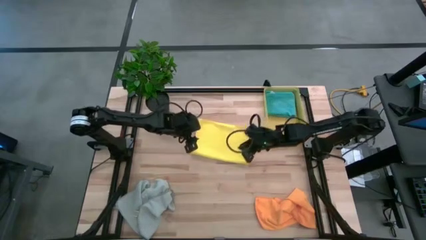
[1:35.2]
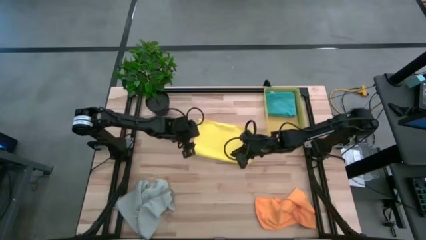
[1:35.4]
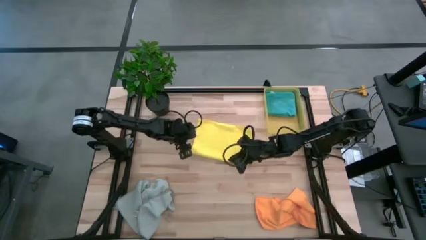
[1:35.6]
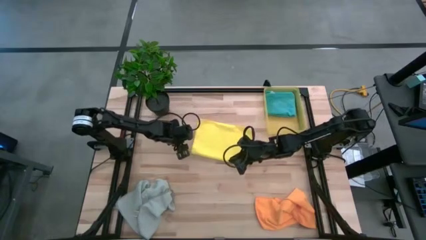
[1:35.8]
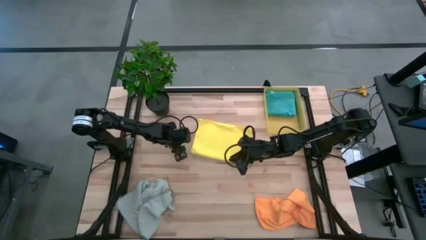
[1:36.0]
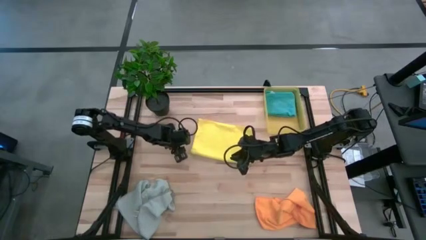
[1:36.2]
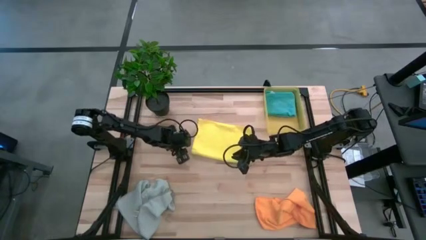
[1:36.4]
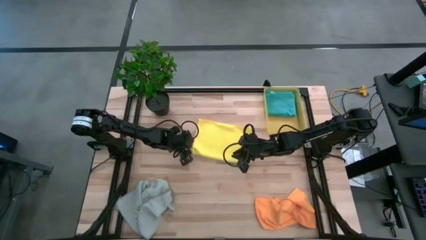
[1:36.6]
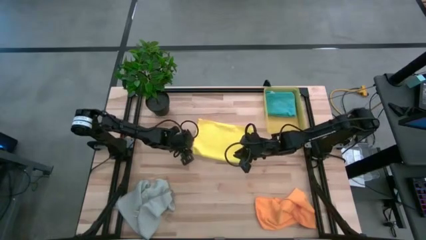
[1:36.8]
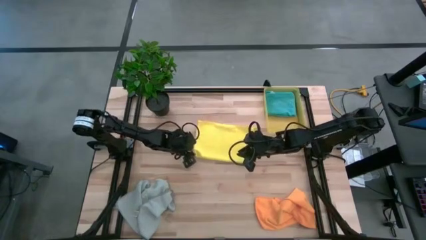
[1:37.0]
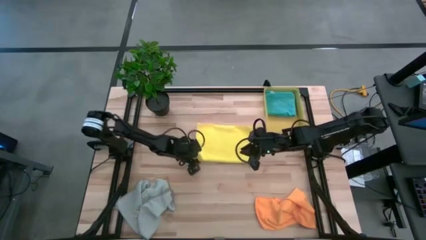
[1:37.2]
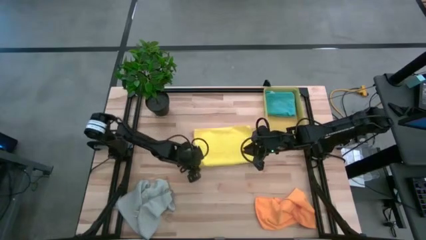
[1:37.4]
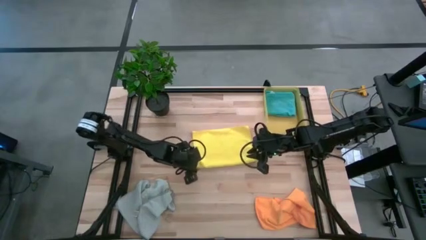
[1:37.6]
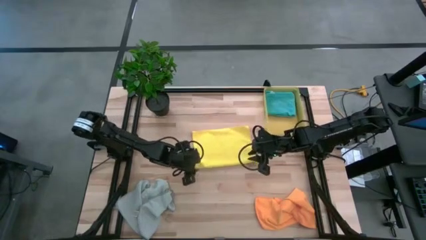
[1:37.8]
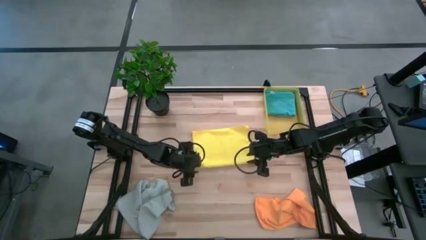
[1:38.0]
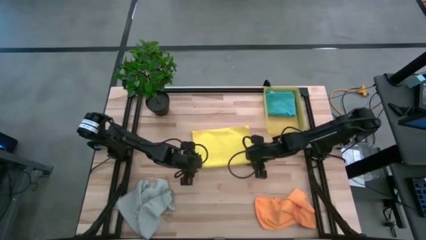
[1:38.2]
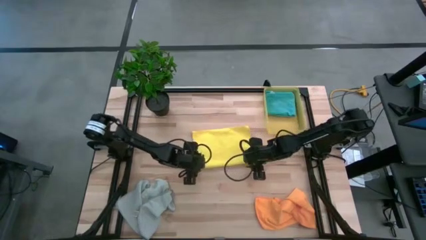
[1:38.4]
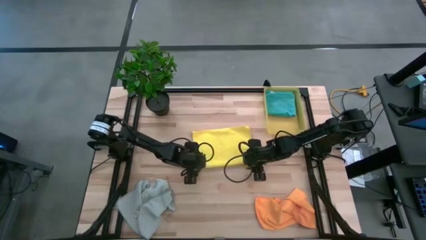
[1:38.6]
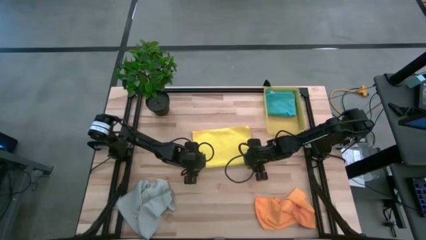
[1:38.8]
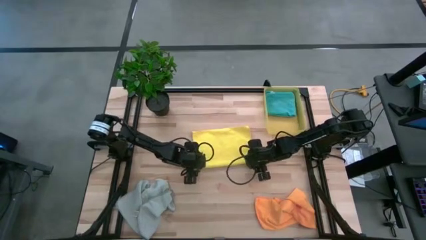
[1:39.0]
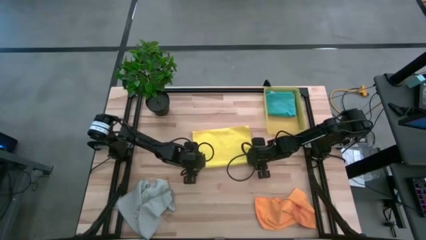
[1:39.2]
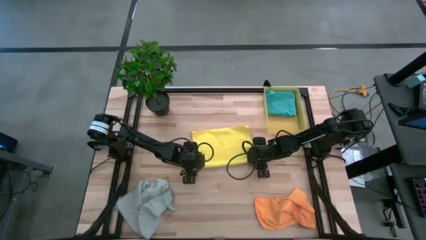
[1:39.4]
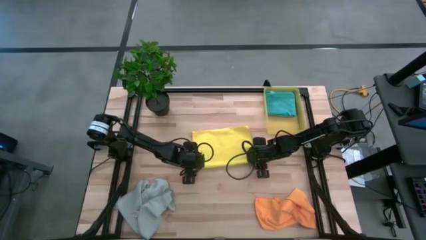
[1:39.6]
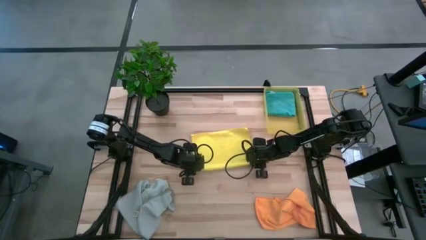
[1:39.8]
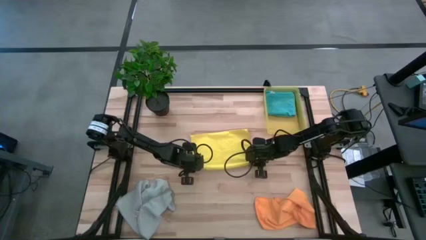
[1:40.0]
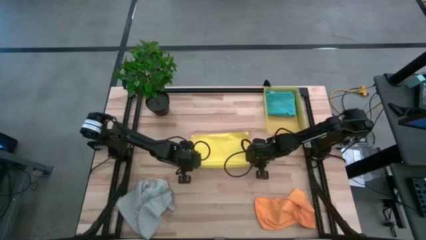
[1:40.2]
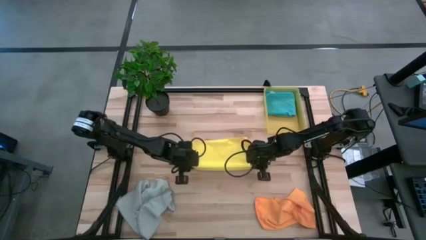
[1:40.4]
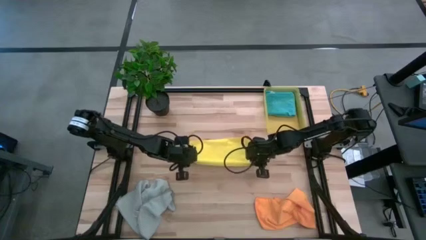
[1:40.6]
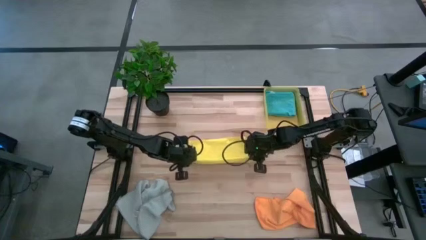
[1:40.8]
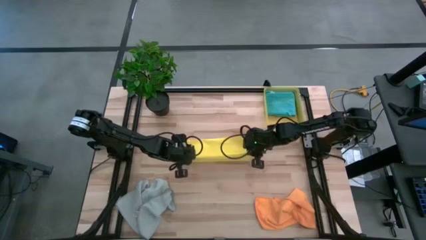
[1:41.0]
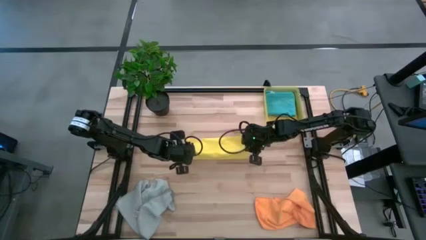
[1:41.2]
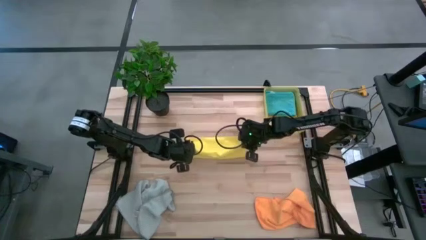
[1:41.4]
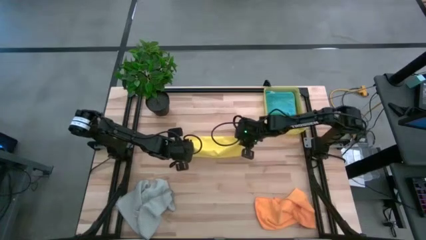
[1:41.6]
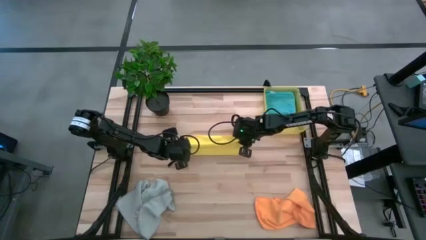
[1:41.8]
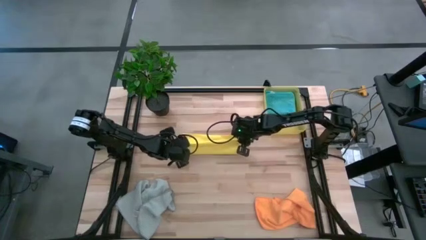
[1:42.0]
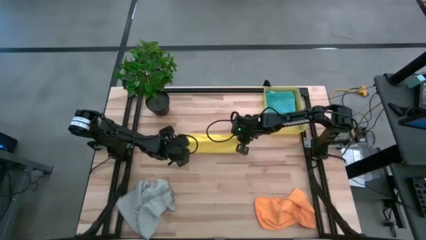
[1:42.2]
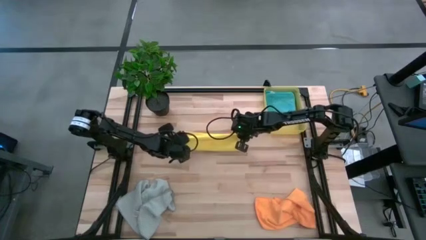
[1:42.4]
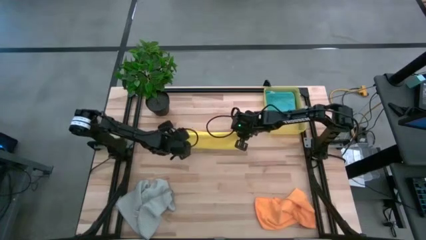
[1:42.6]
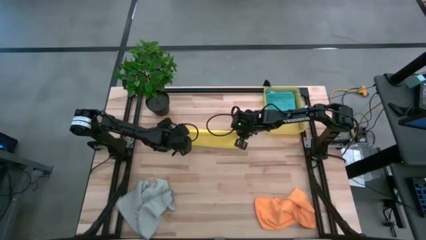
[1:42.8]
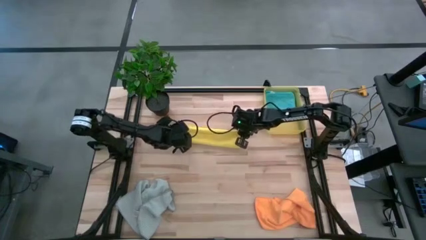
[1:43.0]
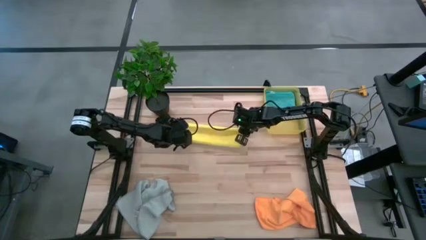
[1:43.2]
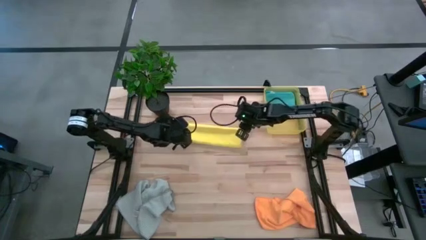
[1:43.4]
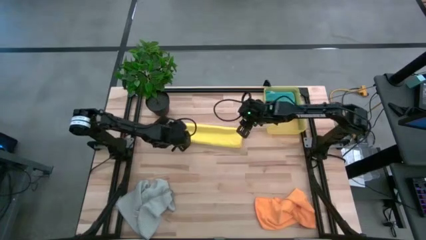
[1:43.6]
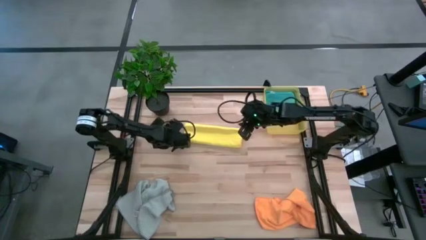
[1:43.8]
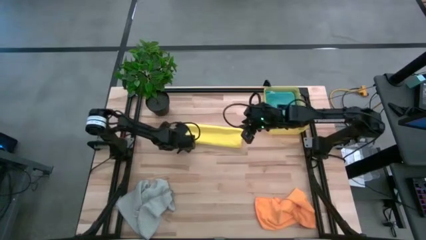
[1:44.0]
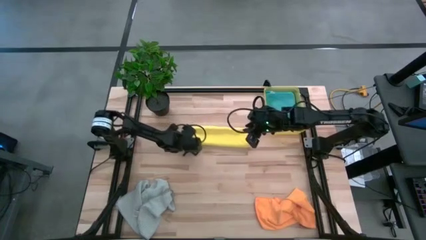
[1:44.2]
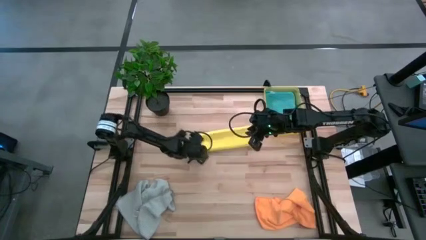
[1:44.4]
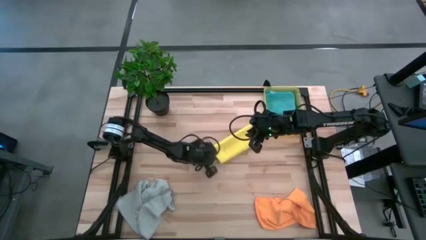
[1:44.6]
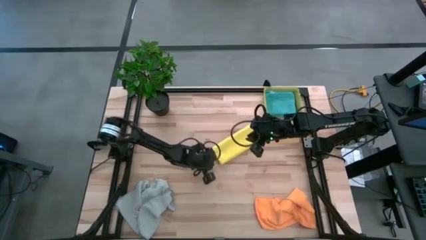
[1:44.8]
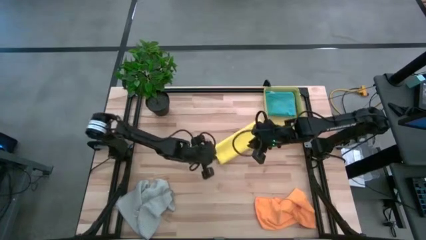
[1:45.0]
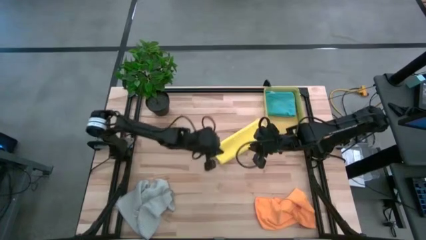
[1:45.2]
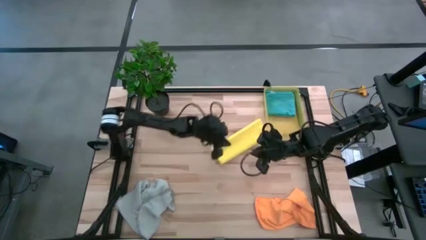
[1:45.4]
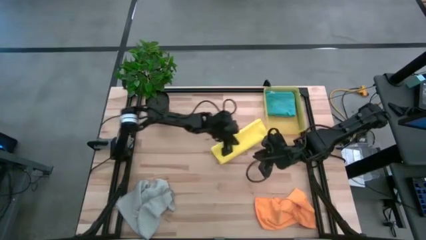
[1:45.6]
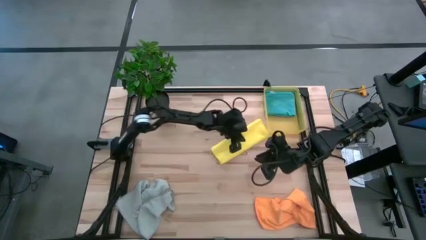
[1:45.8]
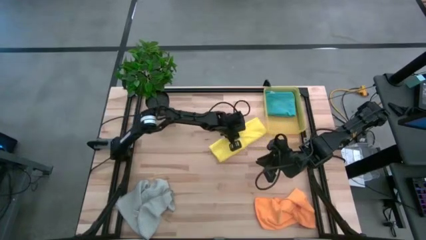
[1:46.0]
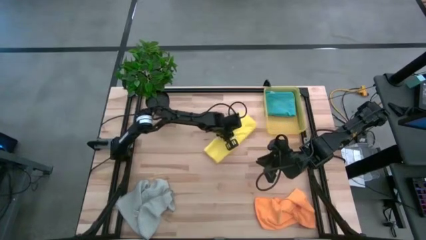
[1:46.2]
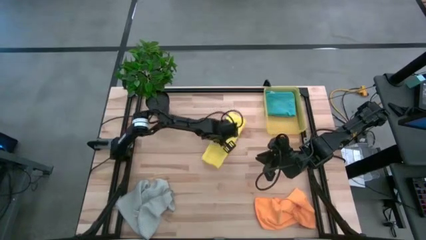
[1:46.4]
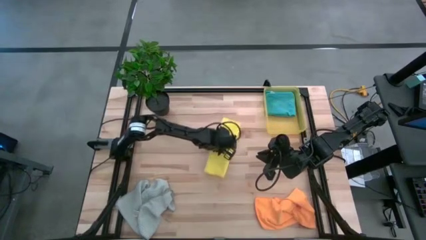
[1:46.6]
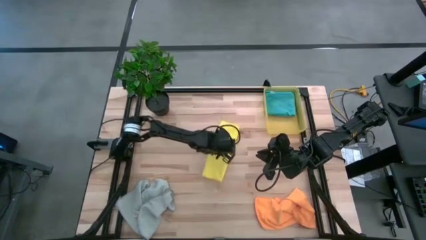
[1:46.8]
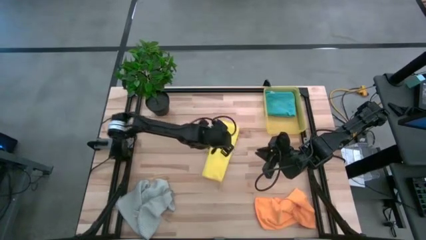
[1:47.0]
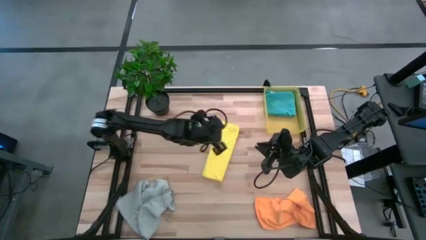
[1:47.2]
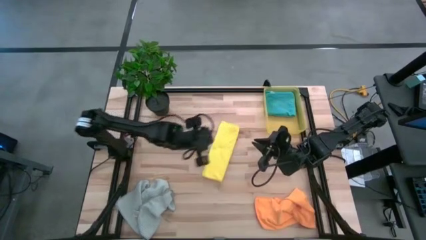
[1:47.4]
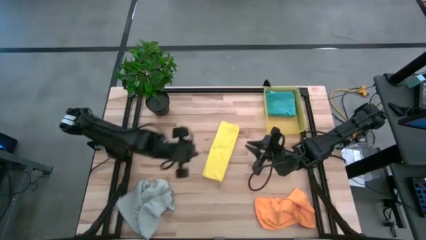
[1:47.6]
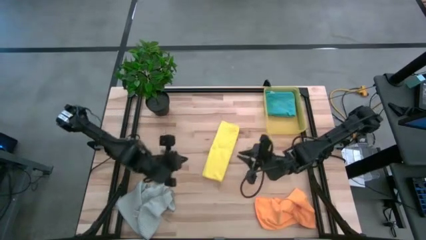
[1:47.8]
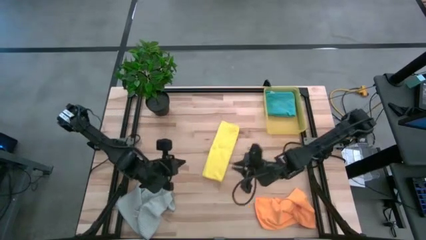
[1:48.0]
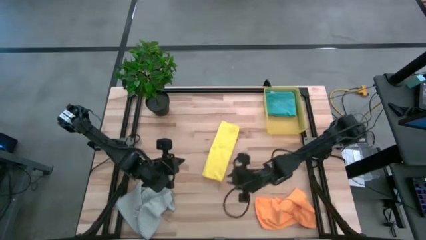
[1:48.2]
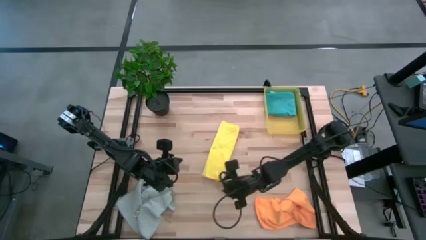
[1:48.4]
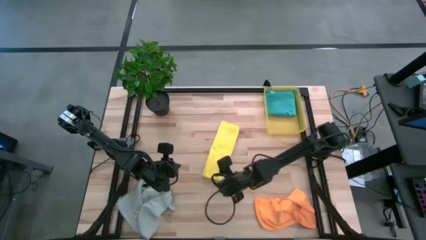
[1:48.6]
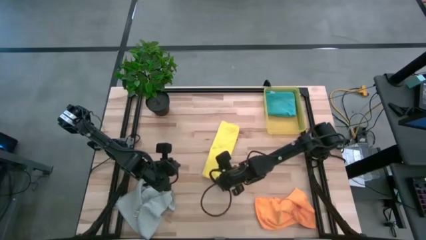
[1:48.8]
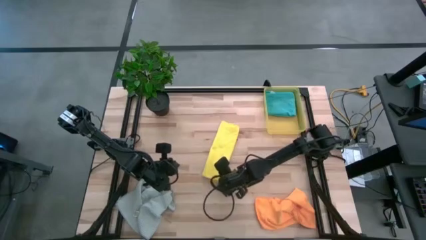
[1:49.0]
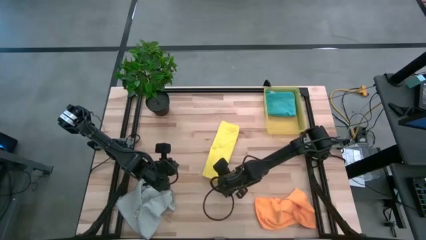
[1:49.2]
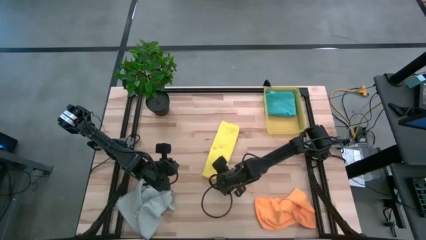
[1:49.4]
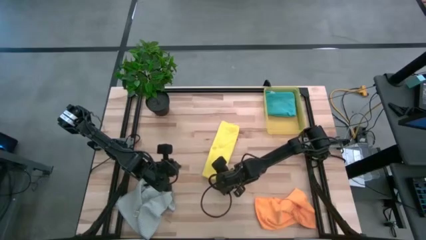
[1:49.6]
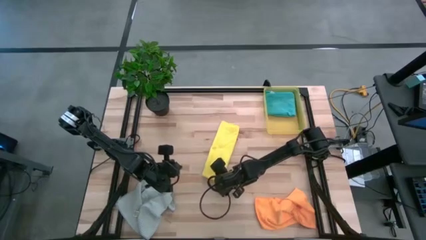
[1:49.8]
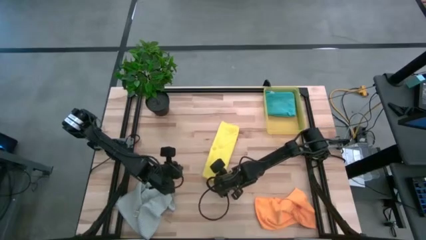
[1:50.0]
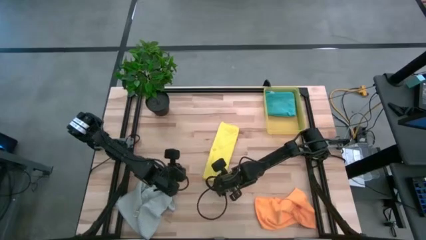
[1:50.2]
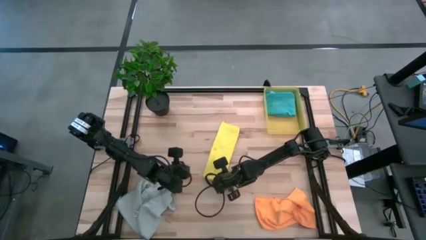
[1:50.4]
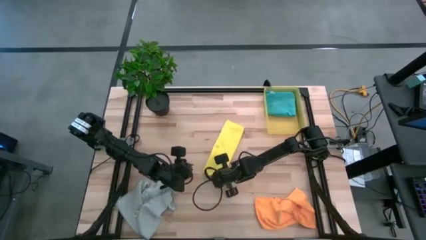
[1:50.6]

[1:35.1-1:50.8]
Task: Fold microfiber towels
Fold the yellow microfiber towel
